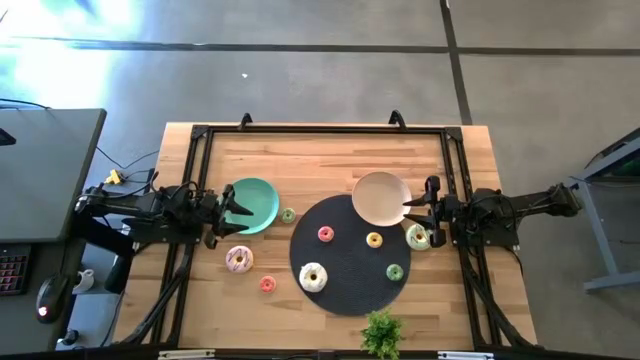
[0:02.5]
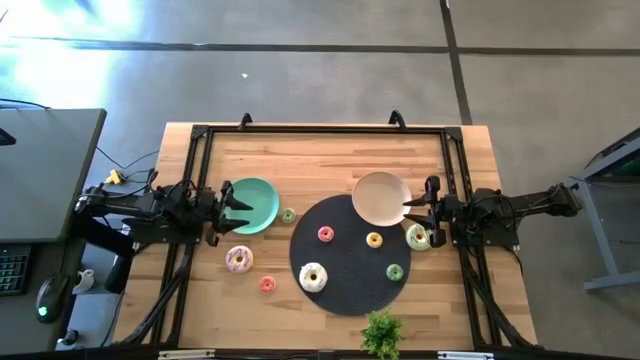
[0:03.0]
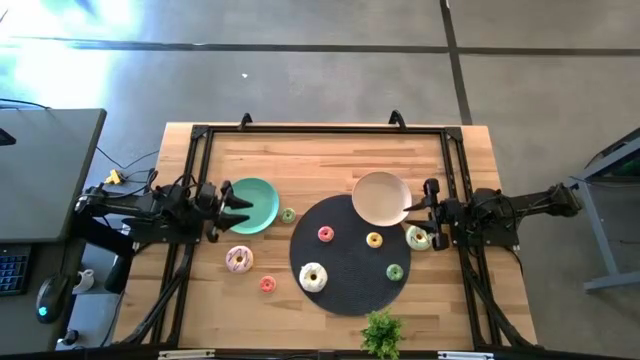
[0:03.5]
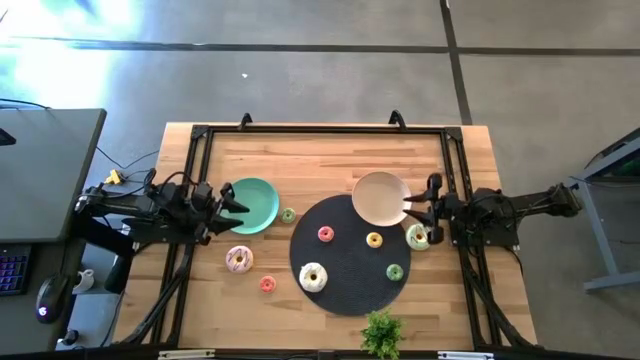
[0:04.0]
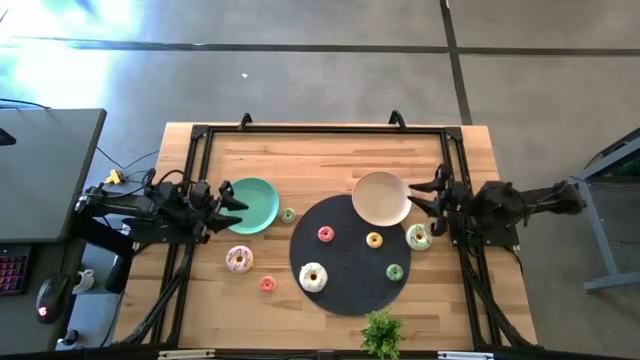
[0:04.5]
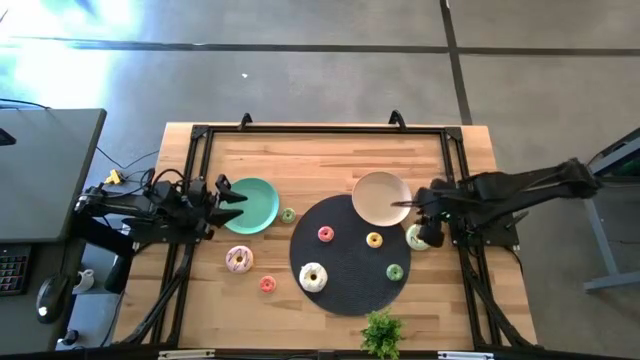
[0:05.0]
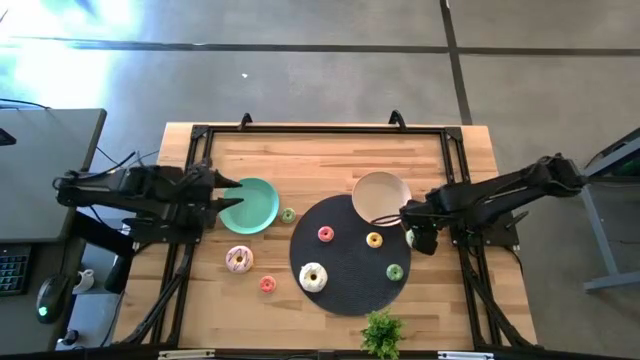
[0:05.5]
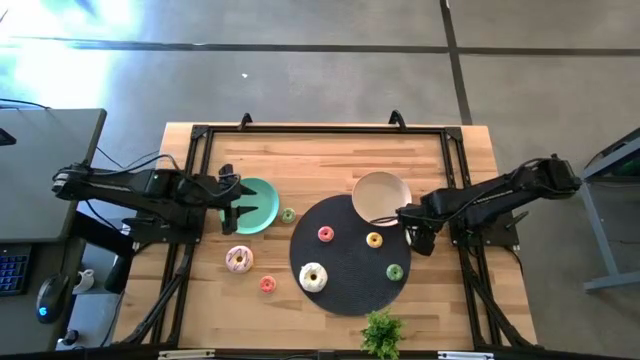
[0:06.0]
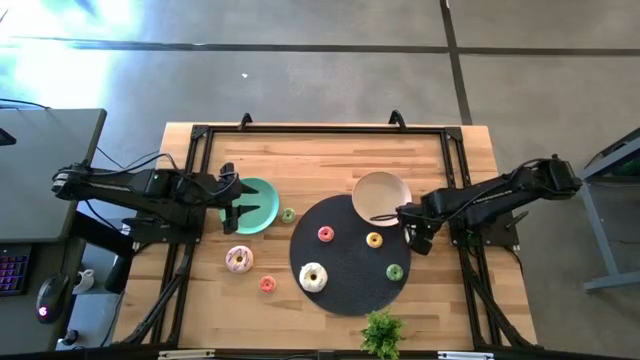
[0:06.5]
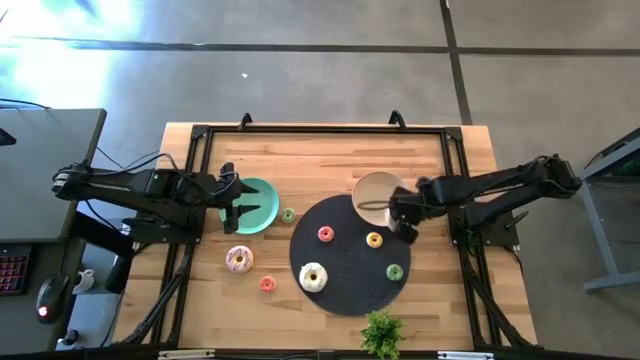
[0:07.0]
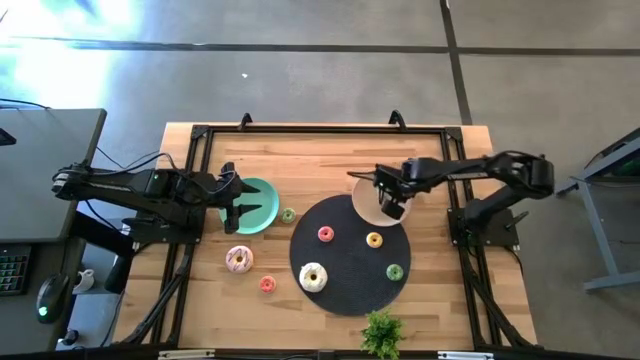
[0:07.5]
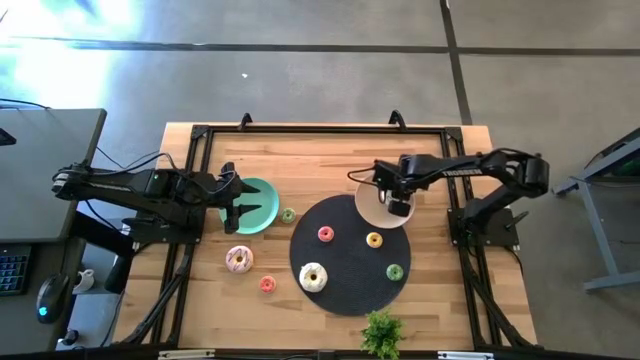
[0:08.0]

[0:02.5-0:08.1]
Task: Pick & Place donuts
Put the large light green donut on the white plate

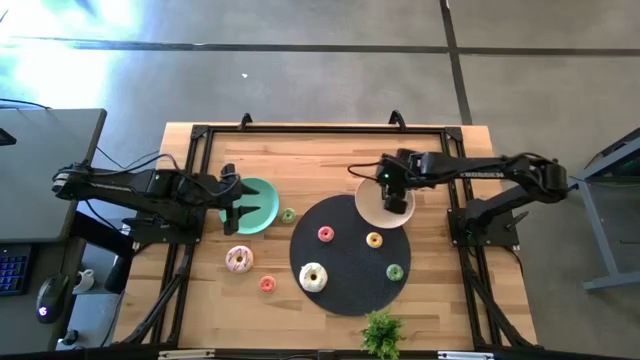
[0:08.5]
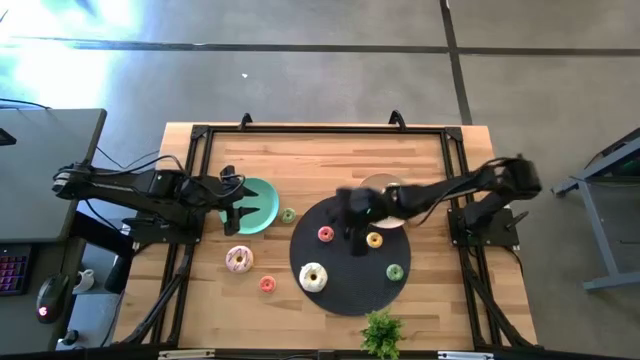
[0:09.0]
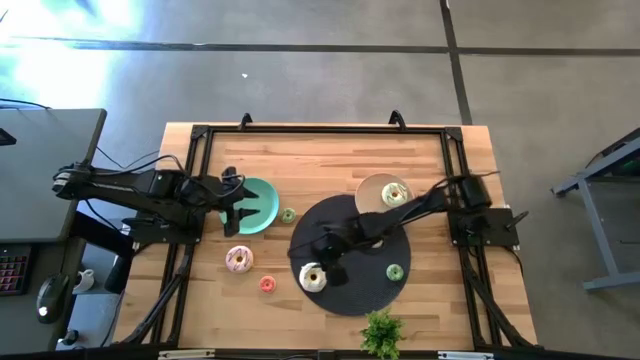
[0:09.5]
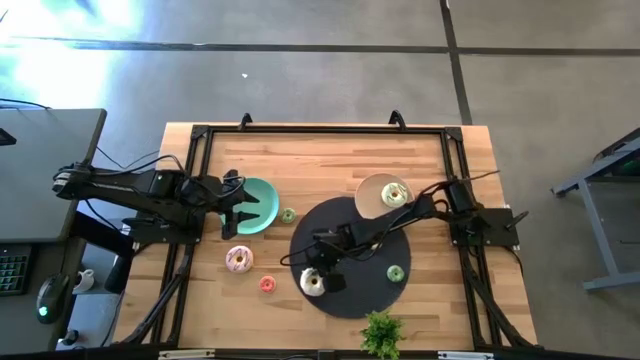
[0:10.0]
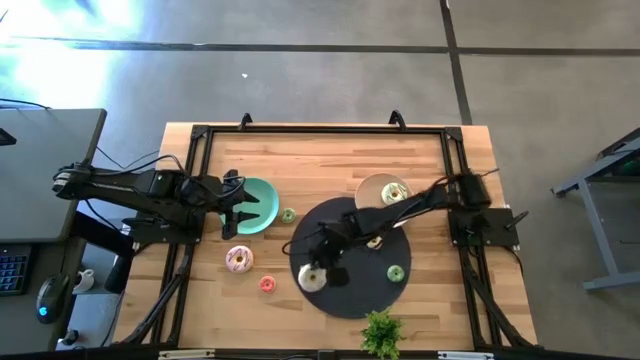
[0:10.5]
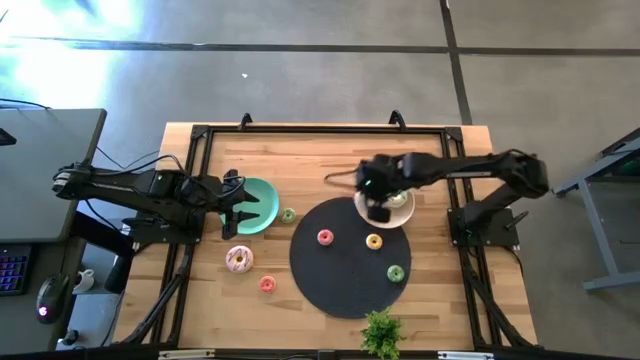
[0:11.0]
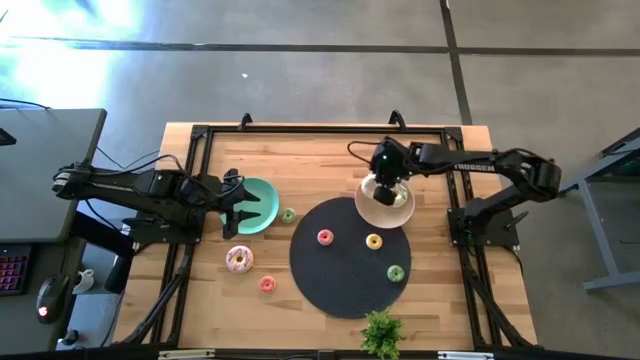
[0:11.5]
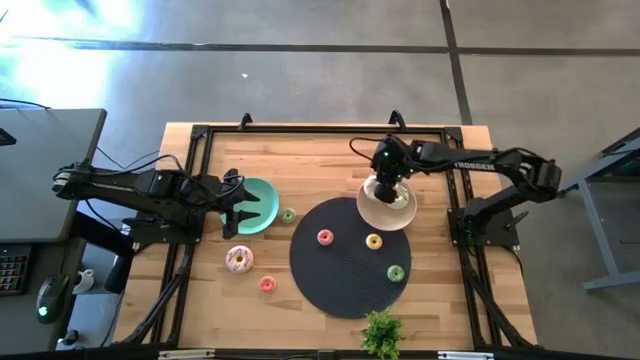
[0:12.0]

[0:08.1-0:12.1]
Put the large white donut on the white plate

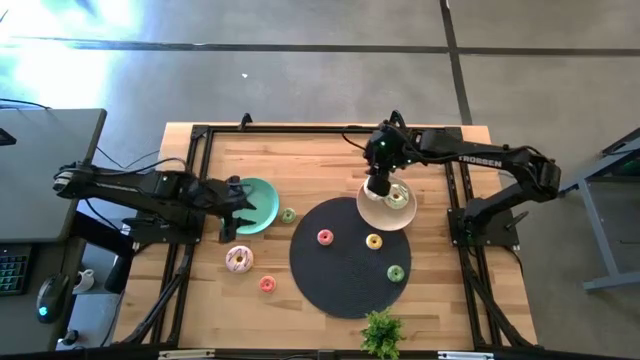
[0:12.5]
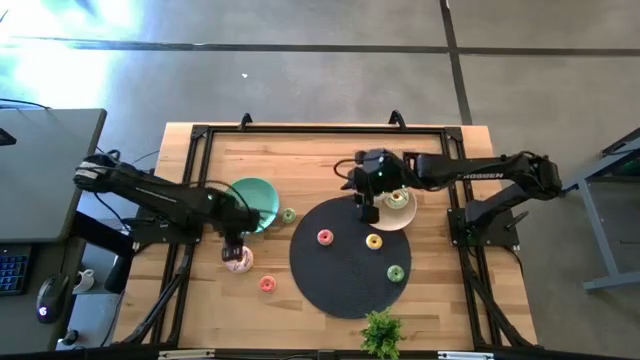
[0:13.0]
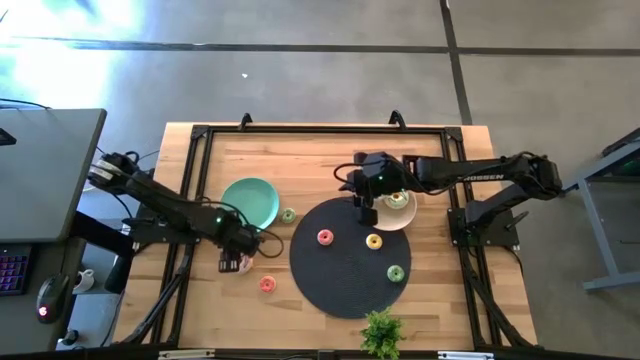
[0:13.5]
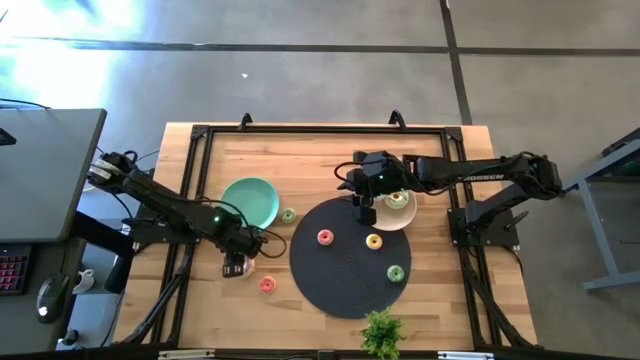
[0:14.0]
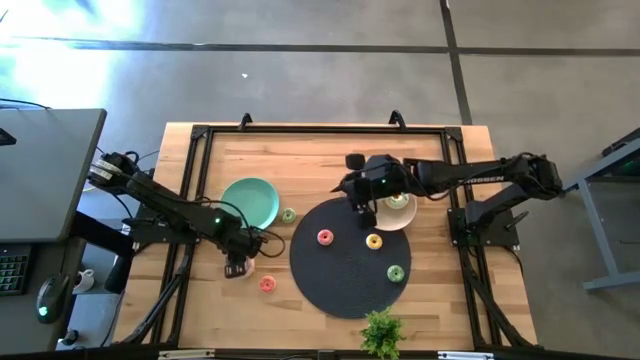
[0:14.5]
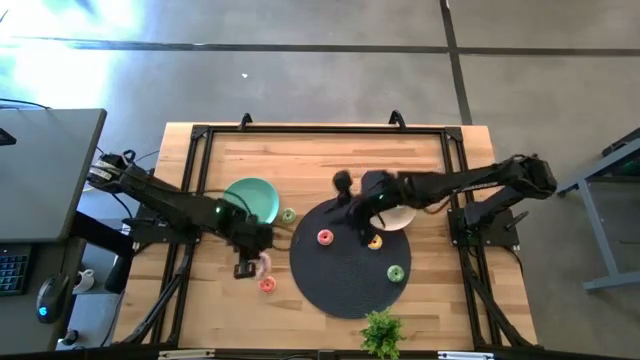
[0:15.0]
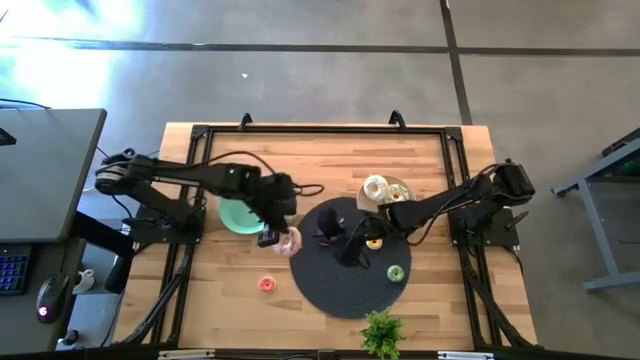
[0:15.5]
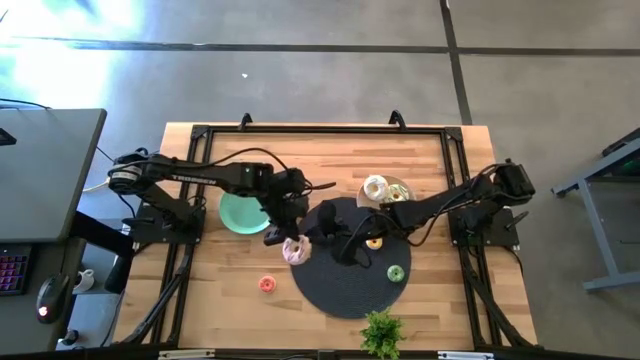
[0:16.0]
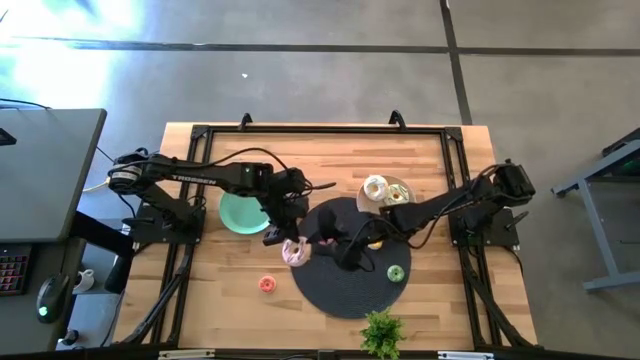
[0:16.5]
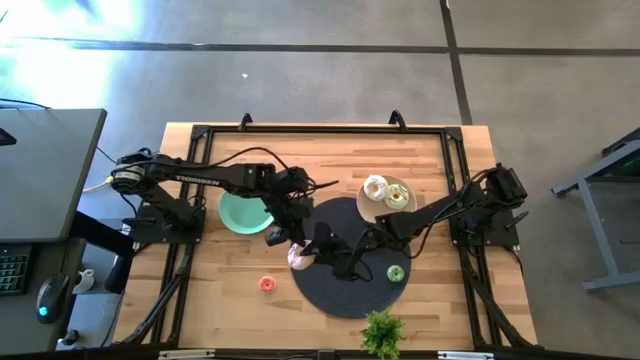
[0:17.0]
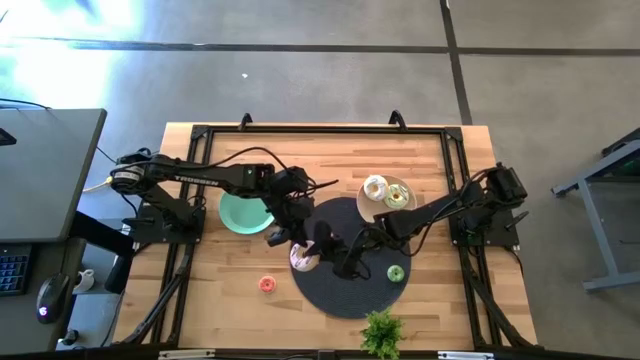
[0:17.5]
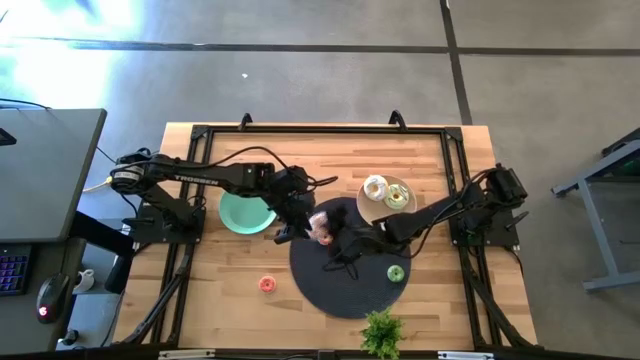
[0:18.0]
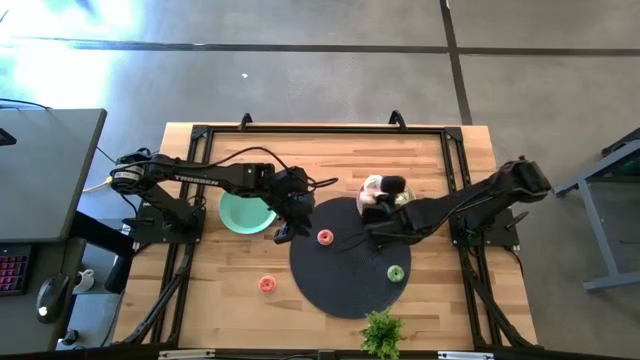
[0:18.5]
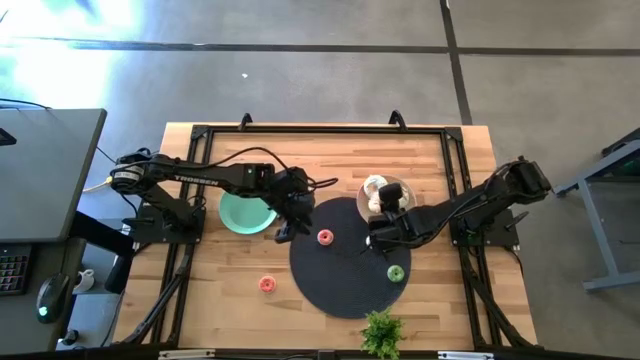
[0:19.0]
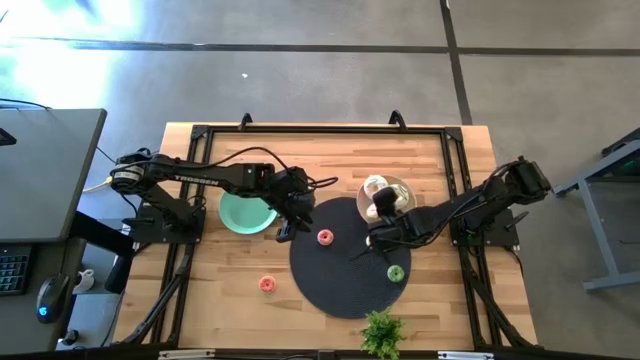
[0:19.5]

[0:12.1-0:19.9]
Put the large purple donut on the white plate

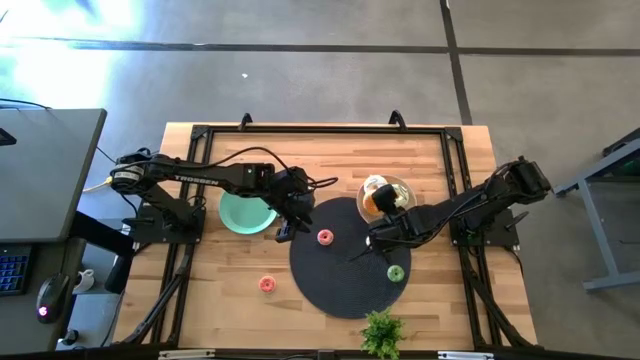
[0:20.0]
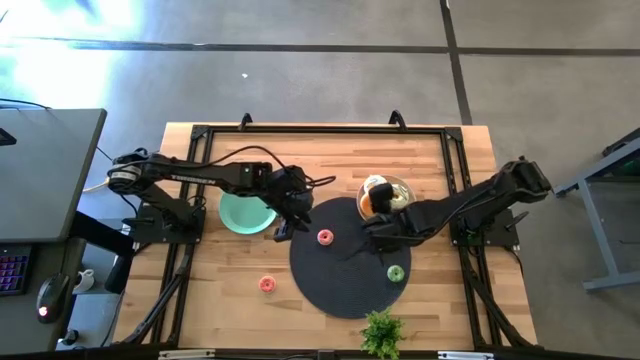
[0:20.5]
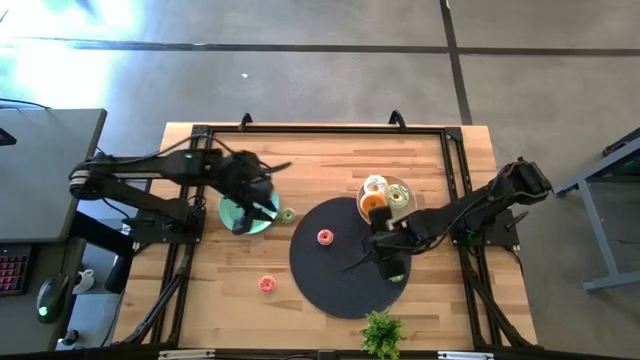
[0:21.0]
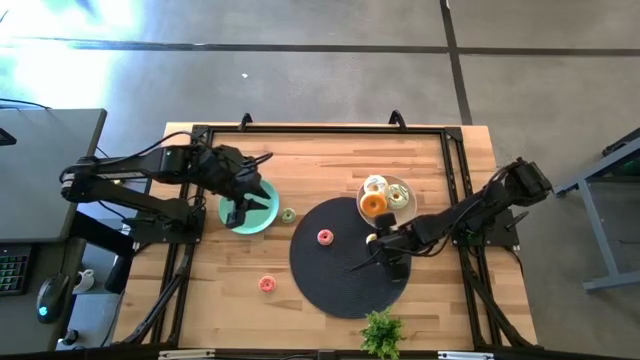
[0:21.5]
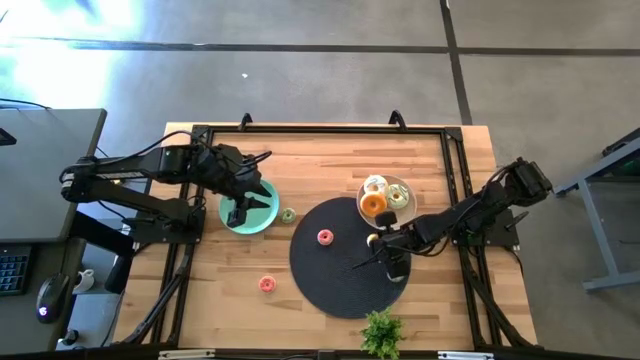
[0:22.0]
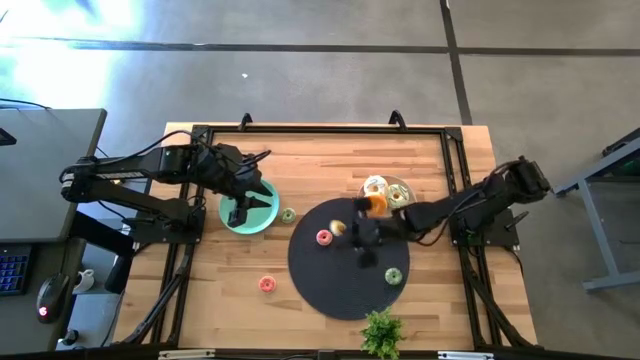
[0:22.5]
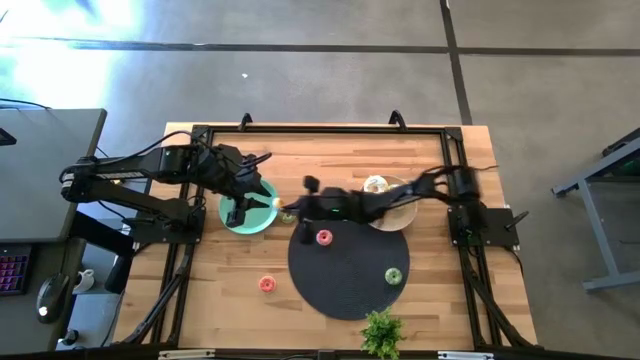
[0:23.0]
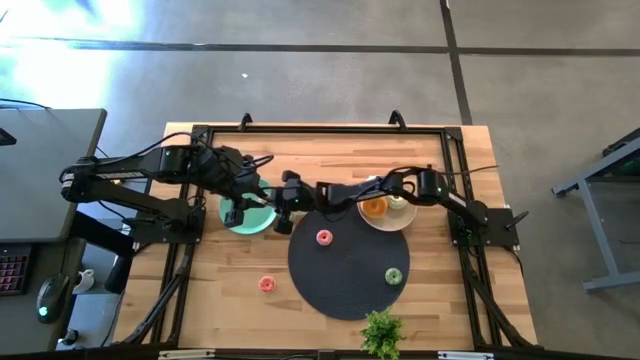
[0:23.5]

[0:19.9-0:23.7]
Put the small yellow donut on the light green plate
